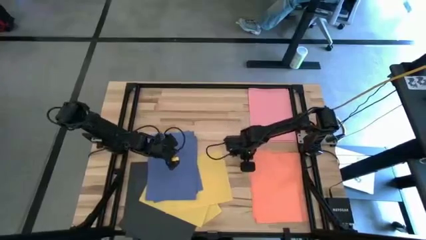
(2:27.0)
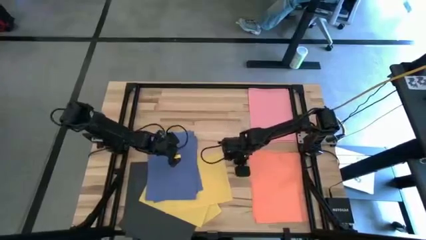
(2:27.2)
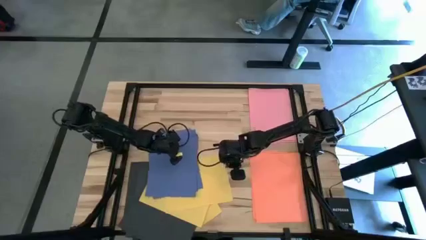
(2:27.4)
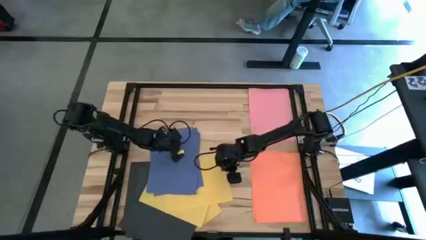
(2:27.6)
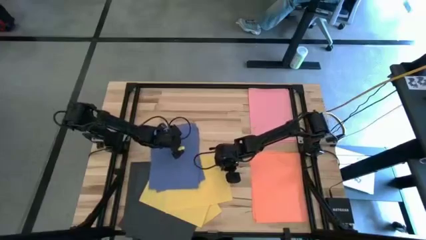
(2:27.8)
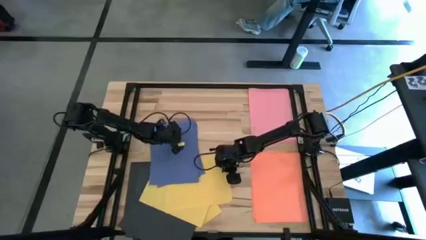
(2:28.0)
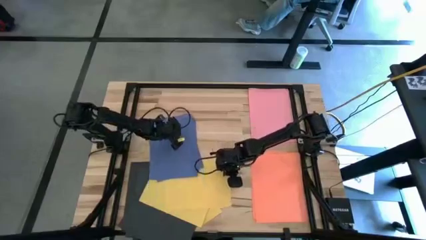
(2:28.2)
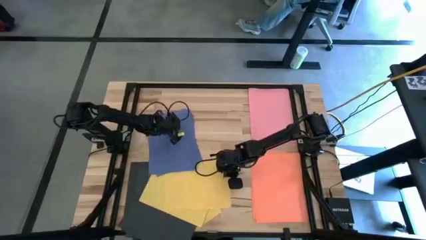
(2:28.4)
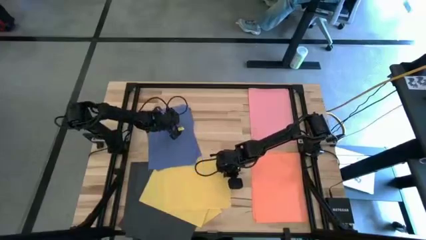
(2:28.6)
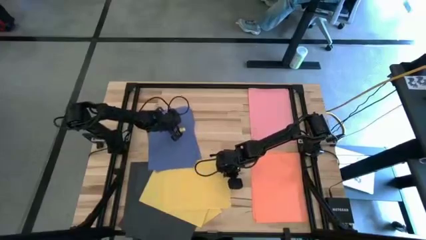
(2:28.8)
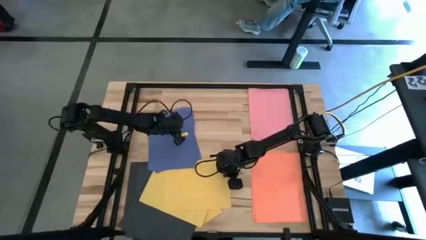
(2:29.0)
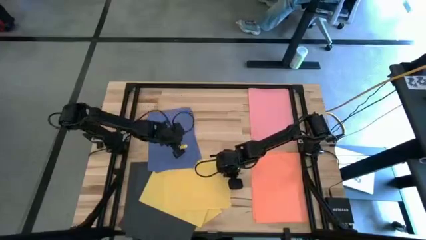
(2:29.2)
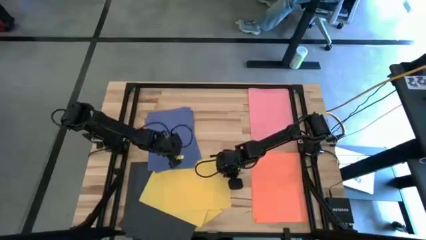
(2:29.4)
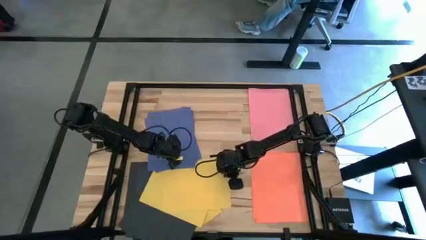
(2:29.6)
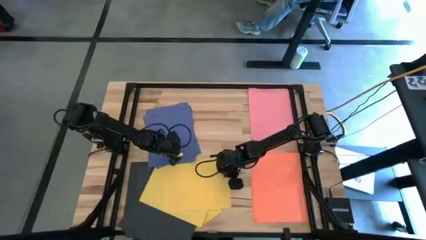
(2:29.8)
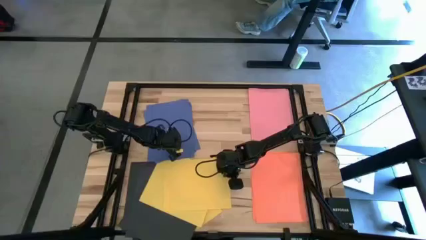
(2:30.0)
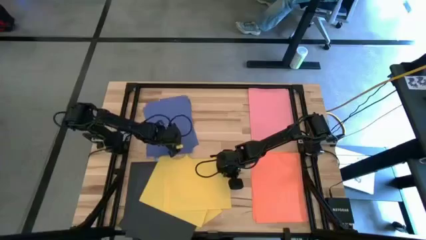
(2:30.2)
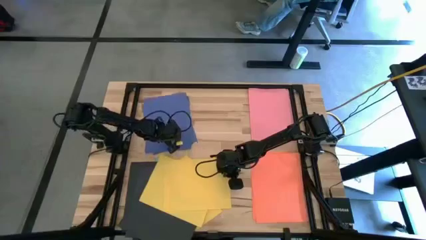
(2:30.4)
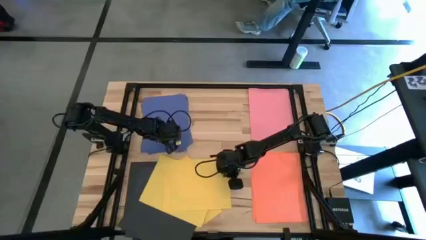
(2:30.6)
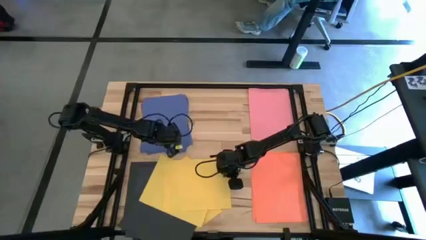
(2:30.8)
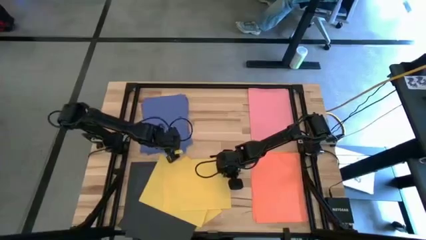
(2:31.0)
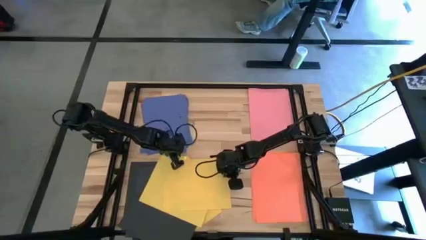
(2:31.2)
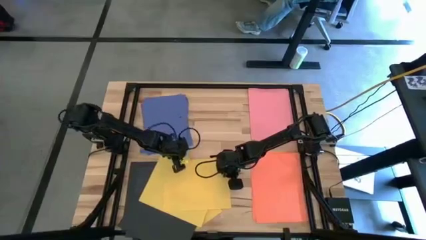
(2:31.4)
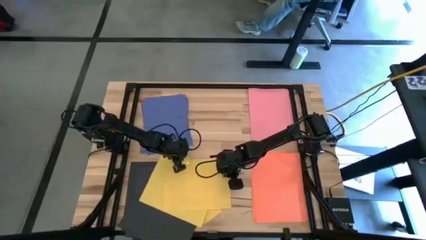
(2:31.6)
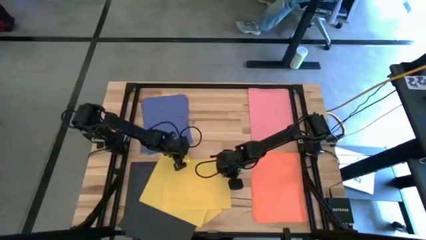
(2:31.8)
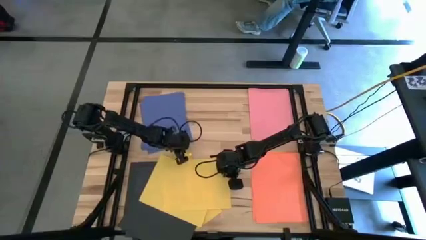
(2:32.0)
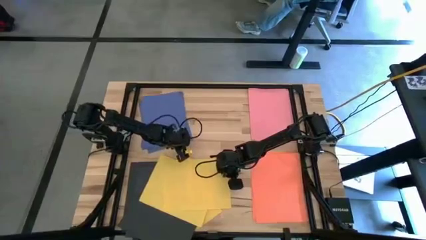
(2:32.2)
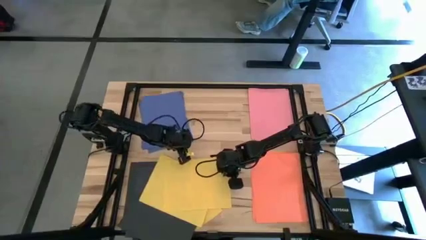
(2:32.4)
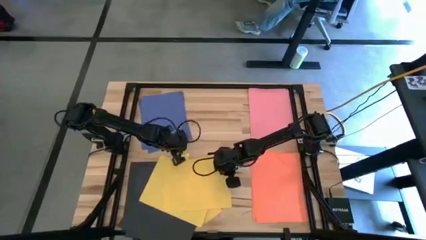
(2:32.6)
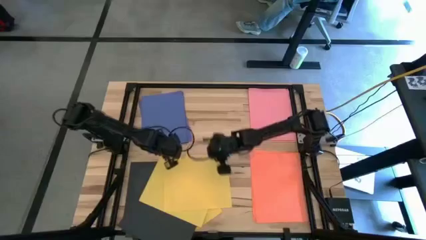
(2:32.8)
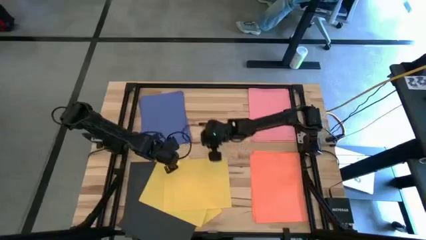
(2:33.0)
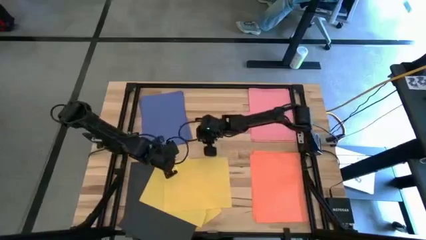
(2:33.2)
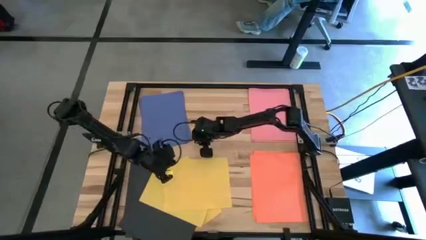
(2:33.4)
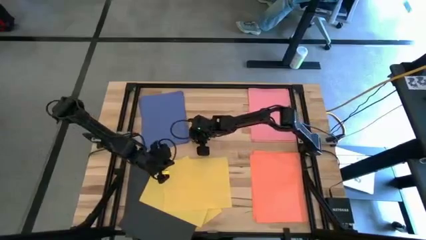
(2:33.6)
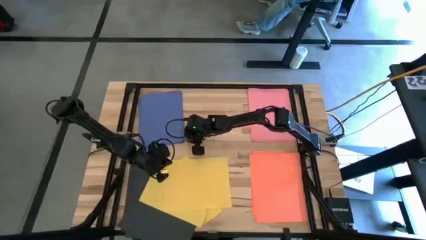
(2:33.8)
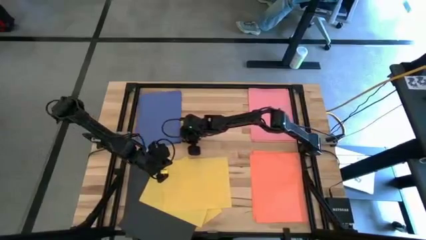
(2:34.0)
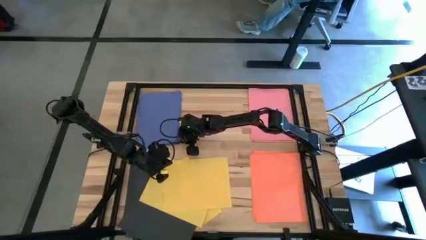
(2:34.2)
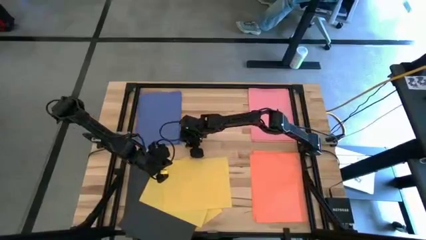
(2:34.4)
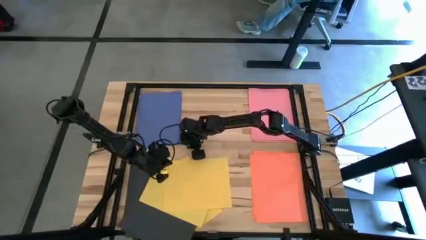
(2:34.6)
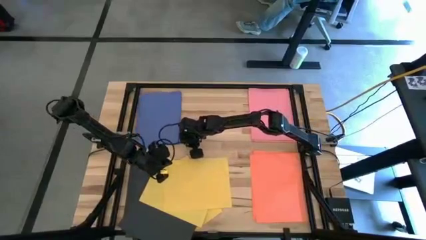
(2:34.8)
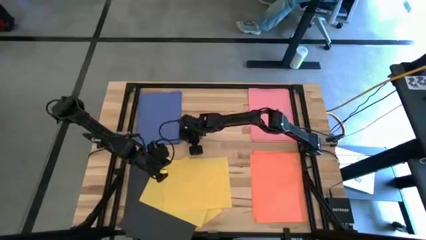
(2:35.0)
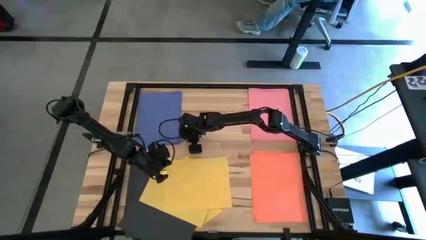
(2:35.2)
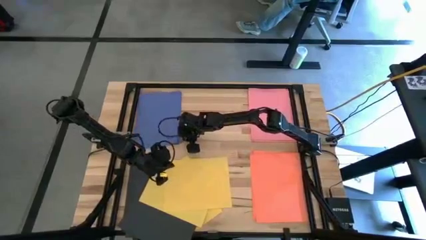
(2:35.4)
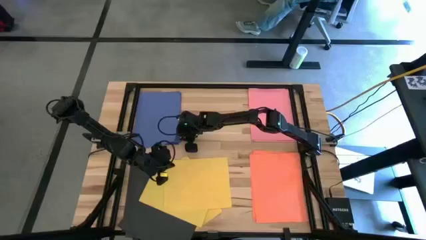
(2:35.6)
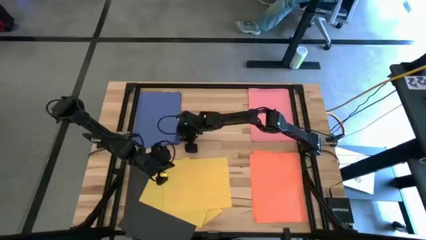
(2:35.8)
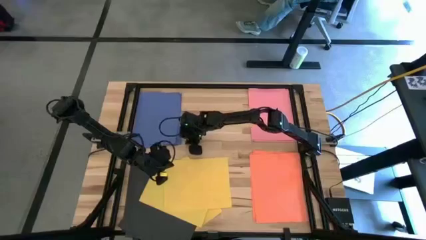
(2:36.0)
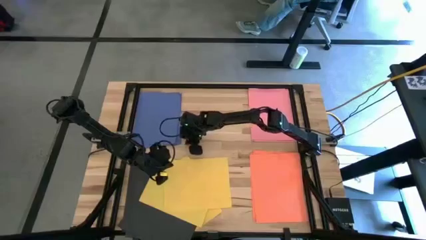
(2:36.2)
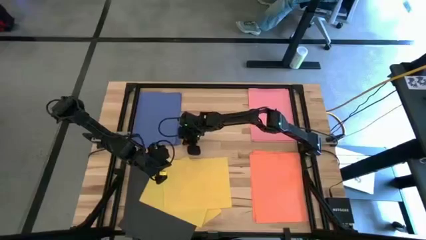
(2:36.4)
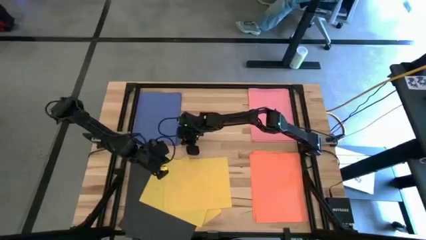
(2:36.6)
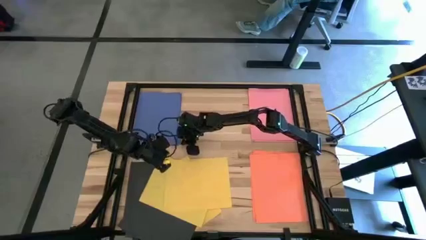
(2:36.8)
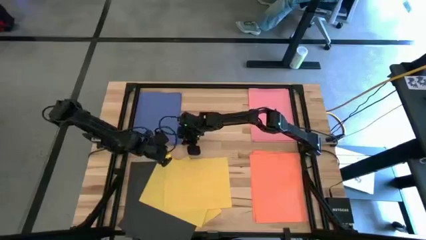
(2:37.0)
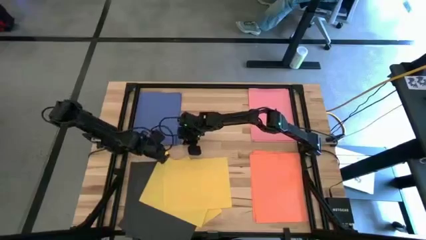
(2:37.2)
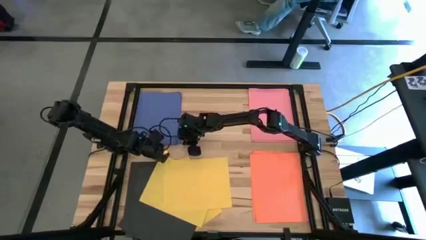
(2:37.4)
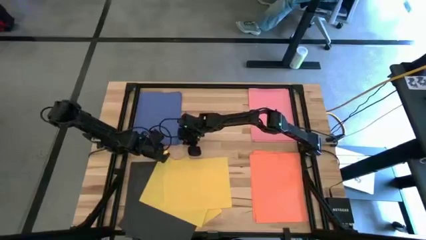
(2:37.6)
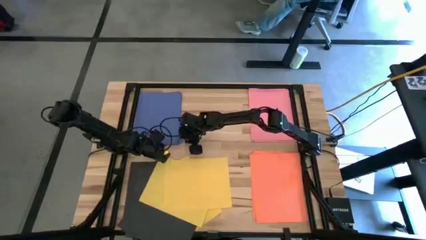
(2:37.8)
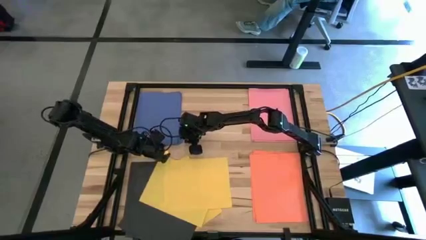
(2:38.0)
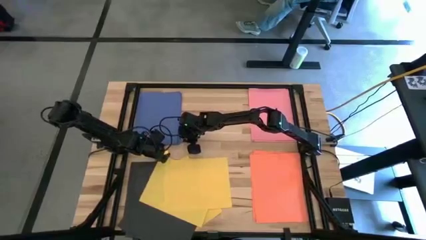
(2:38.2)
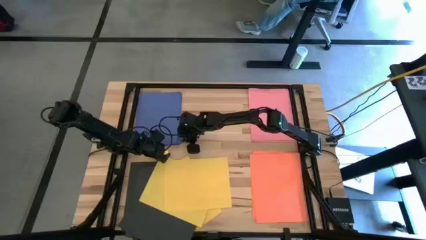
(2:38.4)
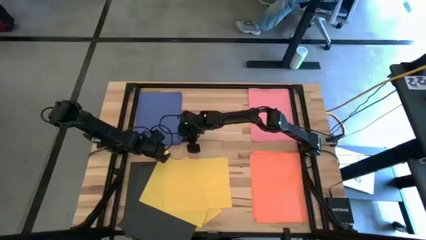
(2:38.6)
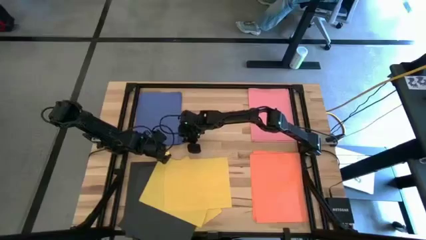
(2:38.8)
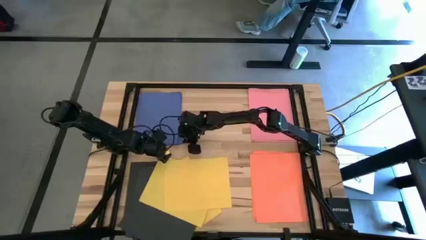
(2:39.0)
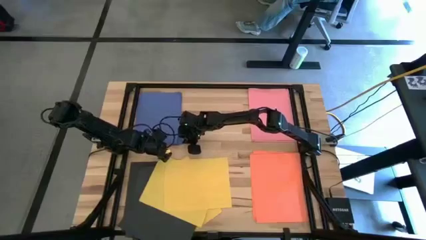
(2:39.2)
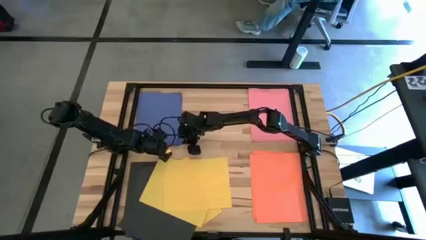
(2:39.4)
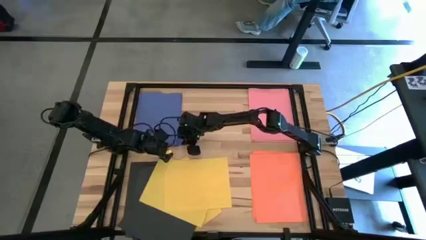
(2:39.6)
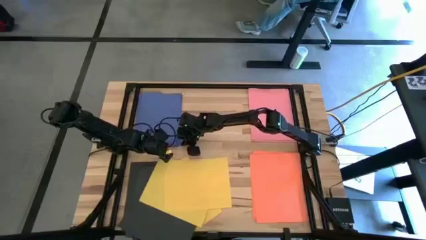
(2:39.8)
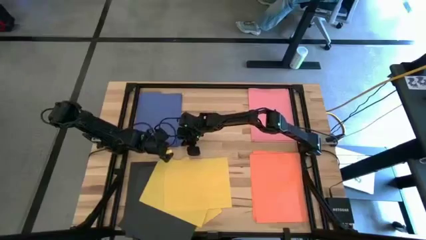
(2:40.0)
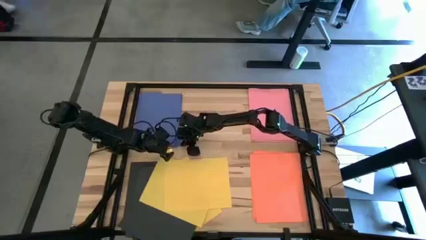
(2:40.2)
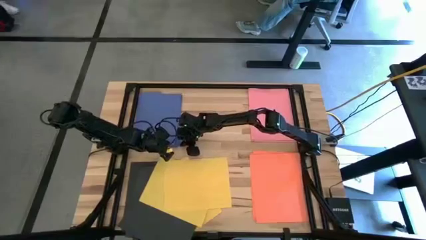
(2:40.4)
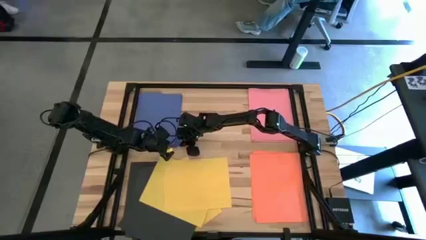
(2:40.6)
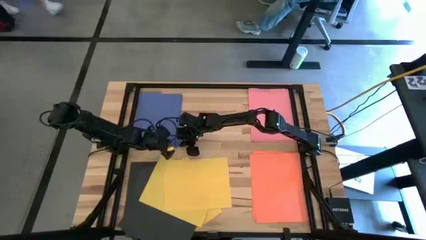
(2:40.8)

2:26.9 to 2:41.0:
Task: Organize paper
Move the blue papers to the top left of the table

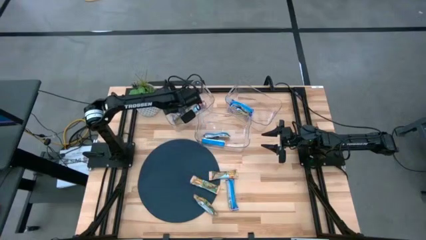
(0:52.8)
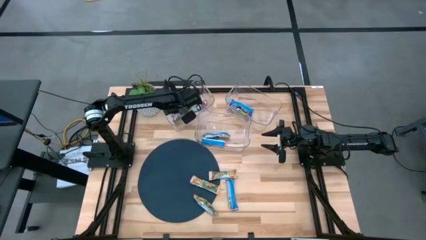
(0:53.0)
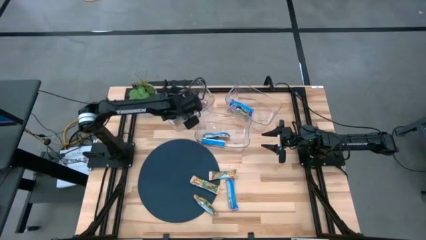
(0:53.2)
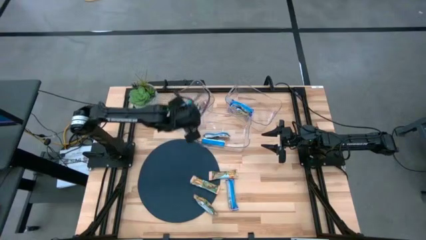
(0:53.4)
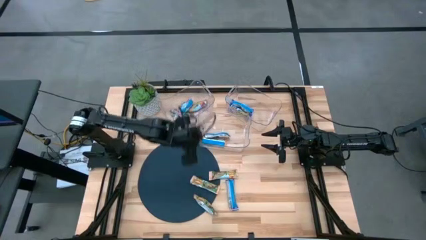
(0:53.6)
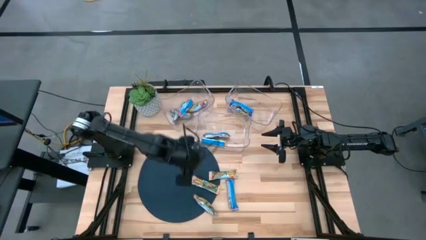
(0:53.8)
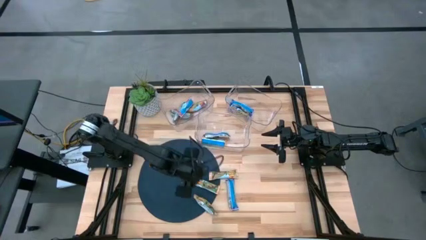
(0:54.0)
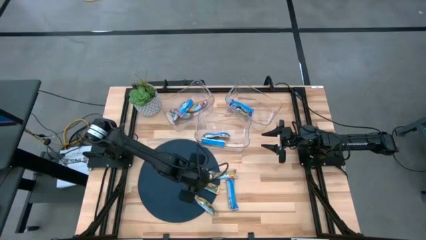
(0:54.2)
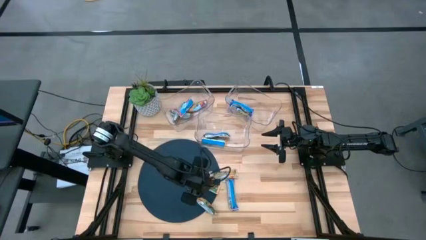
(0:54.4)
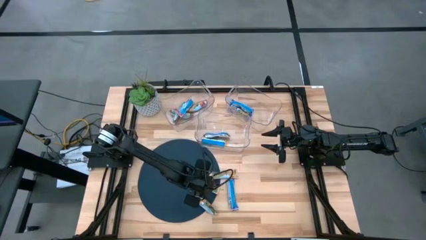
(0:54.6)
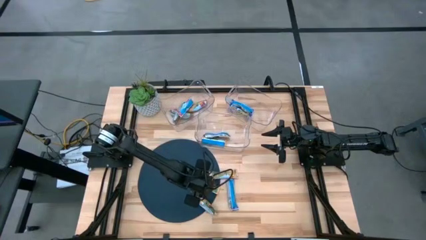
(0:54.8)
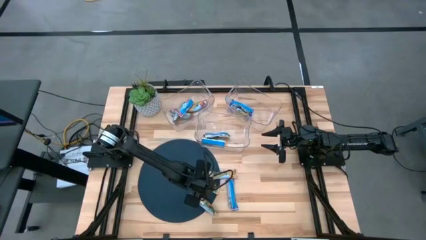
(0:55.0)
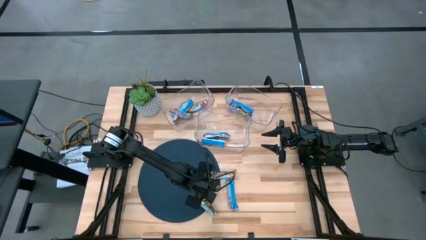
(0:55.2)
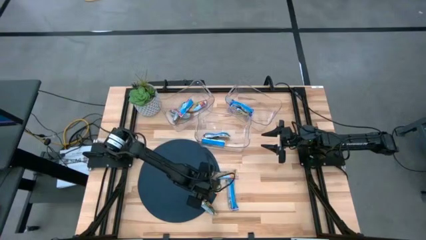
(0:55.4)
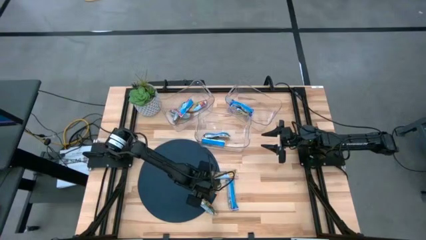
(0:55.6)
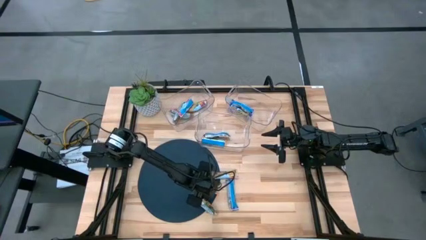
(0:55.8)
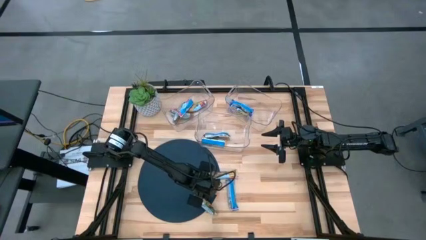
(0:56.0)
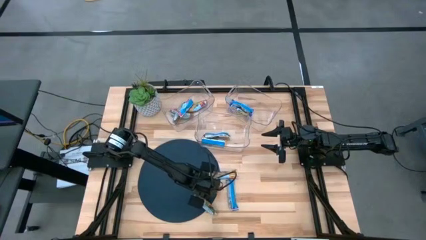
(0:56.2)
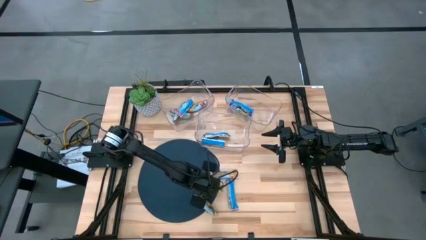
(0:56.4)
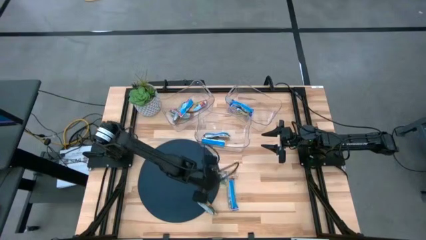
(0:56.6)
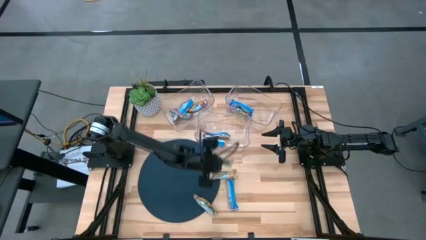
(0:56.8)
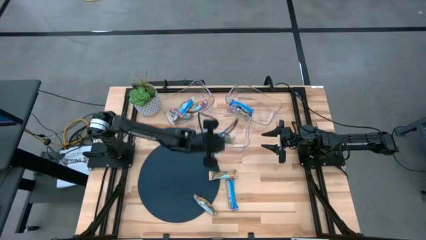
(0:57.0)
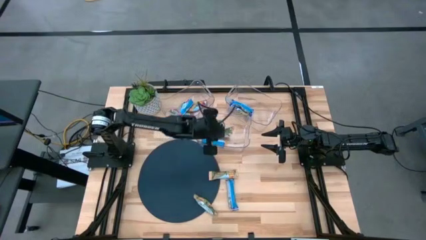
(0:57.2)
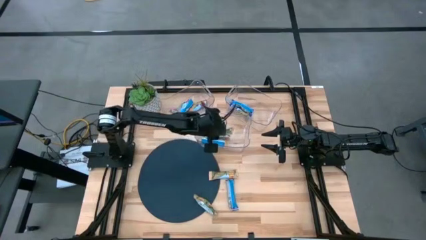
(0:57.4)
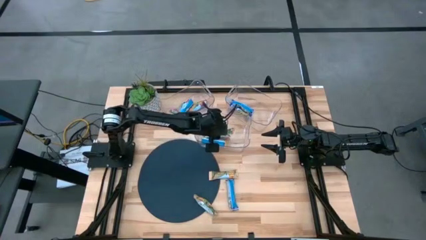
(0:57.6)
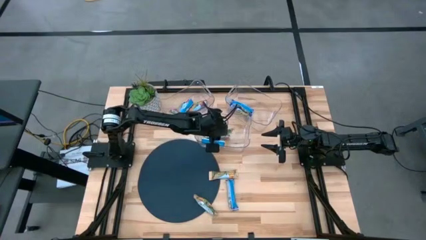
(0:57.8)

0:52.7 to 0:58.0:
Task: Pick and place Granola Bars by type
Put the yellow granola bar into the middle transparent bin
